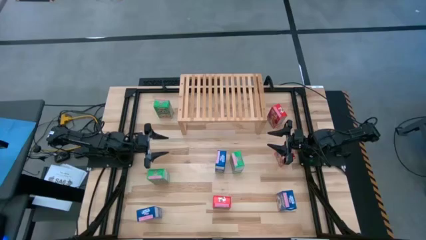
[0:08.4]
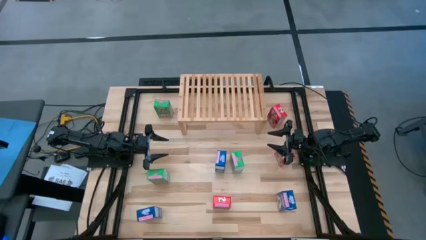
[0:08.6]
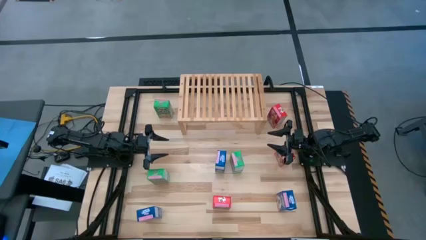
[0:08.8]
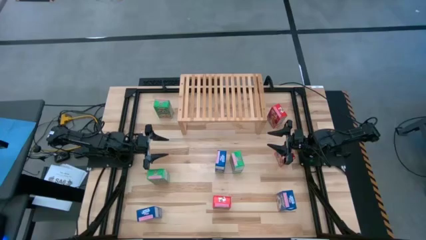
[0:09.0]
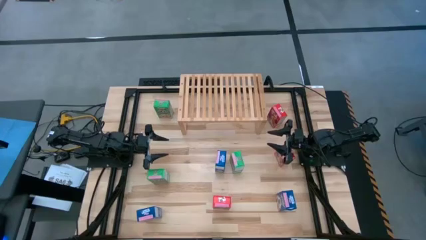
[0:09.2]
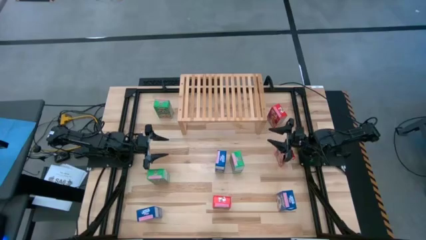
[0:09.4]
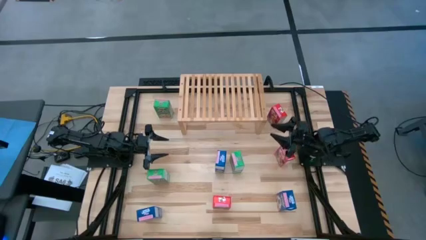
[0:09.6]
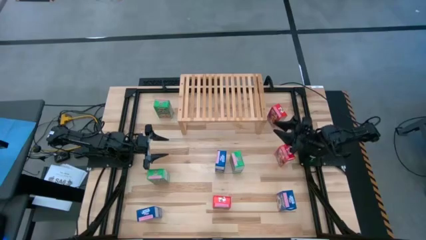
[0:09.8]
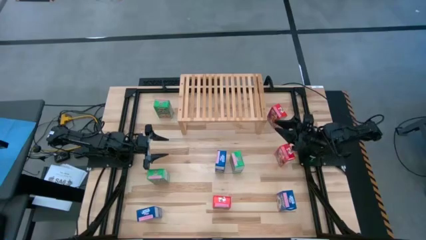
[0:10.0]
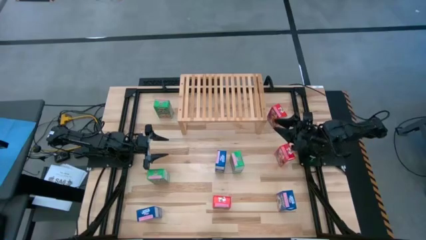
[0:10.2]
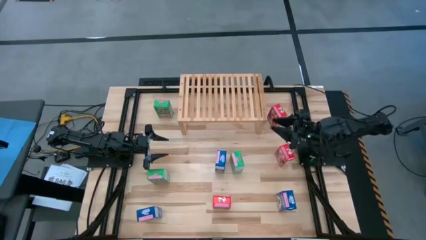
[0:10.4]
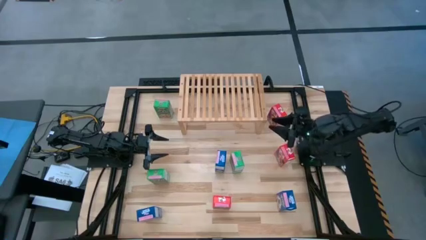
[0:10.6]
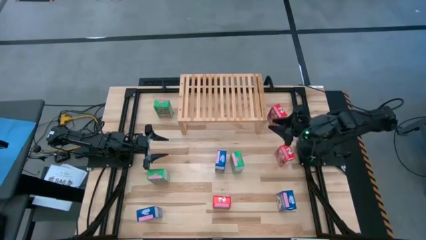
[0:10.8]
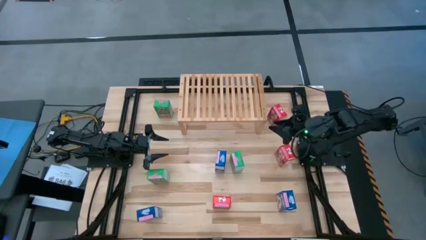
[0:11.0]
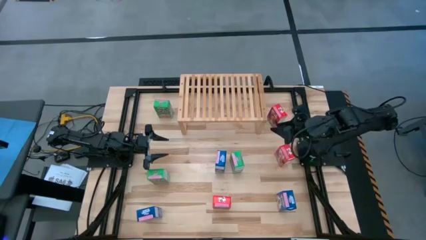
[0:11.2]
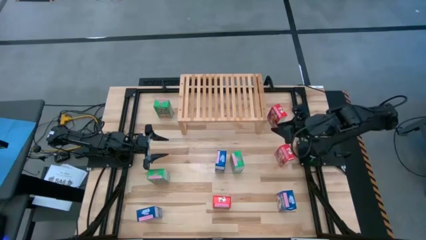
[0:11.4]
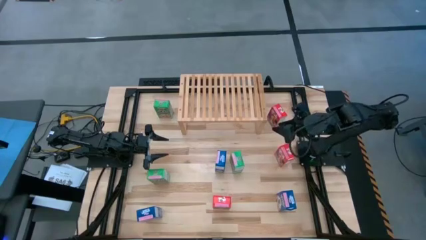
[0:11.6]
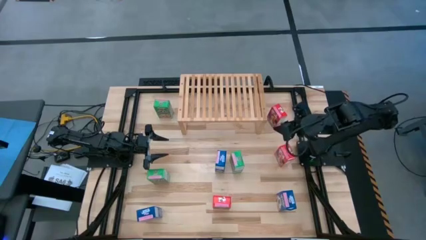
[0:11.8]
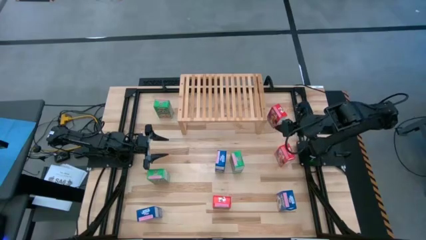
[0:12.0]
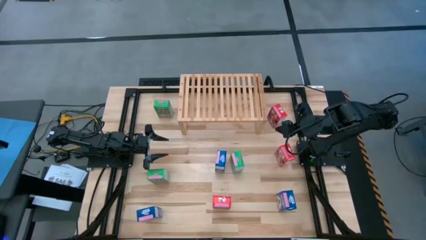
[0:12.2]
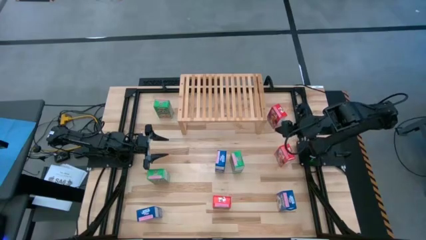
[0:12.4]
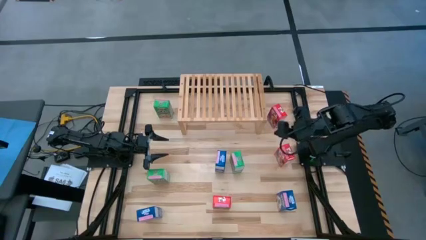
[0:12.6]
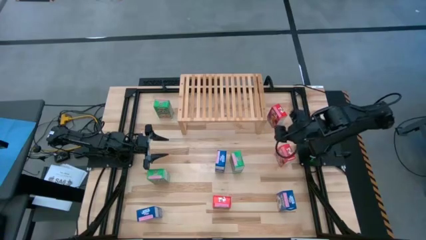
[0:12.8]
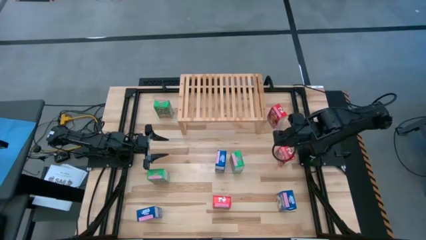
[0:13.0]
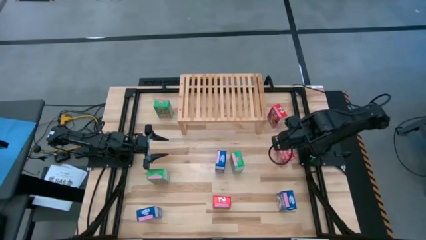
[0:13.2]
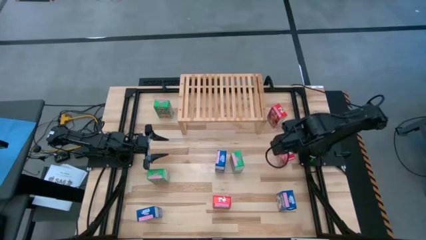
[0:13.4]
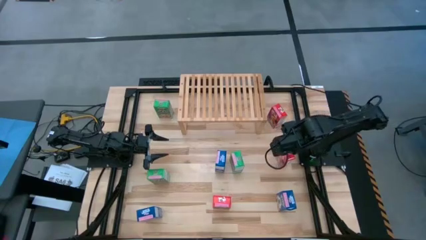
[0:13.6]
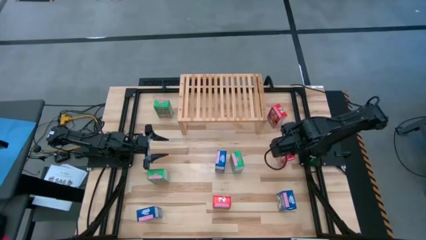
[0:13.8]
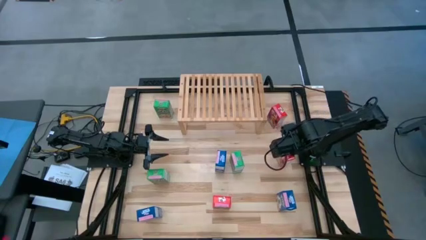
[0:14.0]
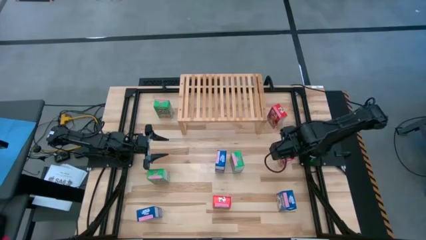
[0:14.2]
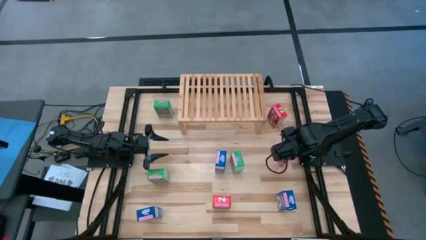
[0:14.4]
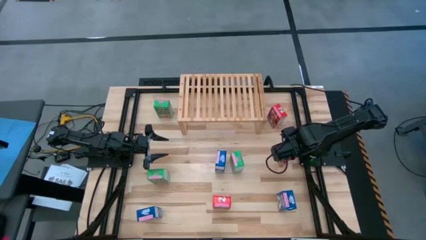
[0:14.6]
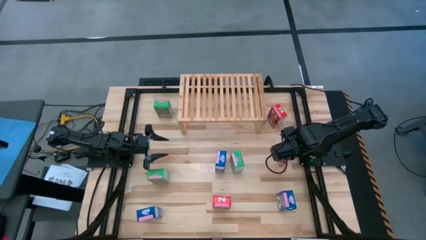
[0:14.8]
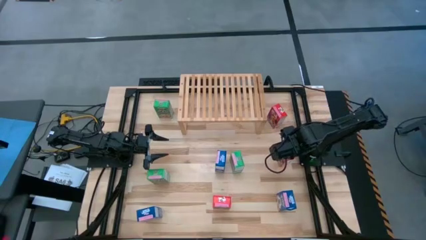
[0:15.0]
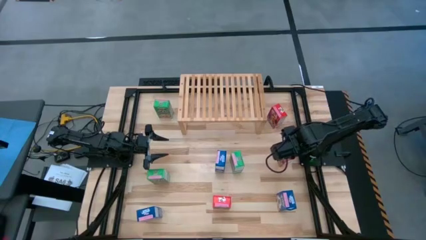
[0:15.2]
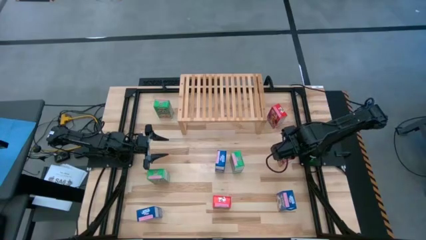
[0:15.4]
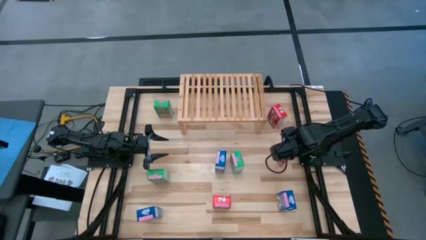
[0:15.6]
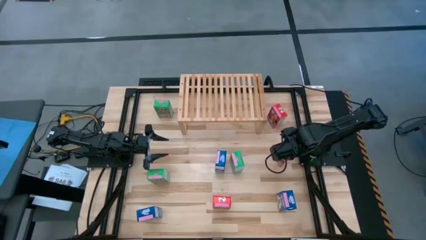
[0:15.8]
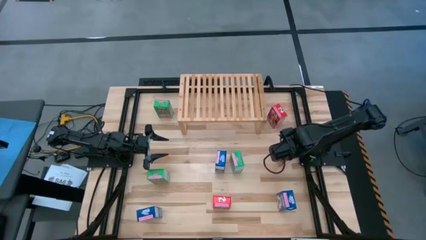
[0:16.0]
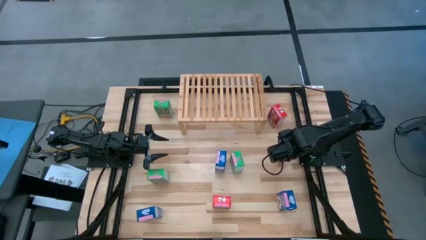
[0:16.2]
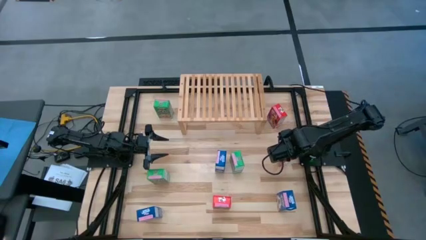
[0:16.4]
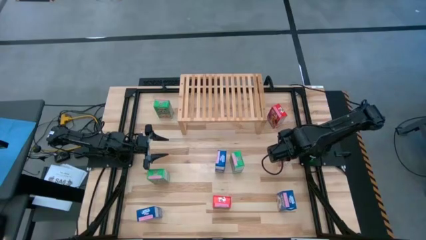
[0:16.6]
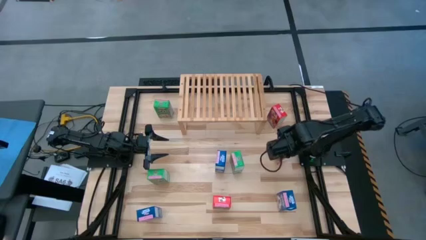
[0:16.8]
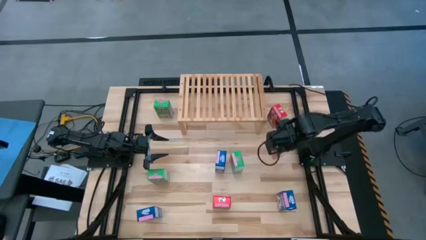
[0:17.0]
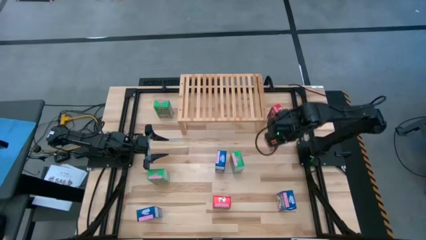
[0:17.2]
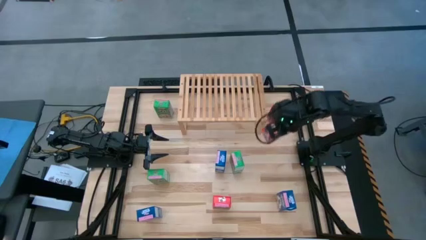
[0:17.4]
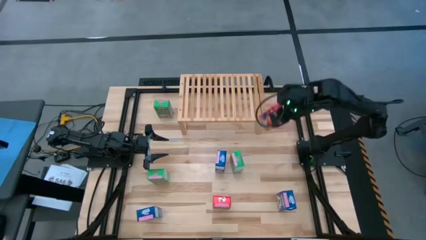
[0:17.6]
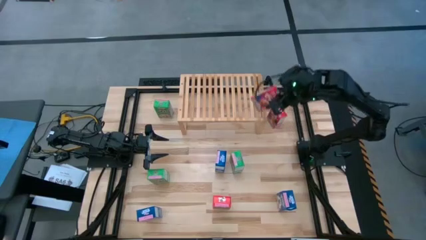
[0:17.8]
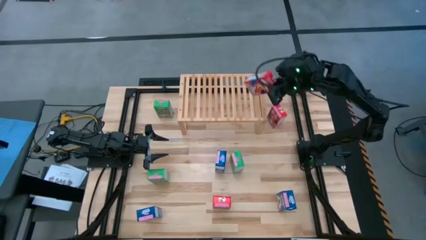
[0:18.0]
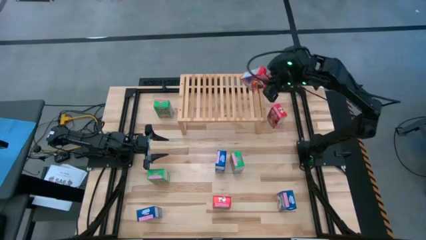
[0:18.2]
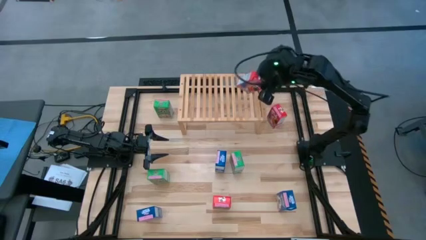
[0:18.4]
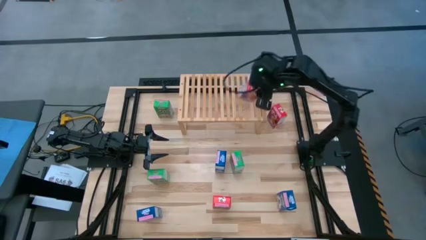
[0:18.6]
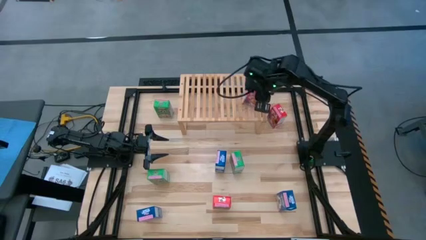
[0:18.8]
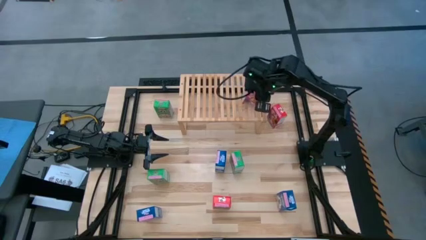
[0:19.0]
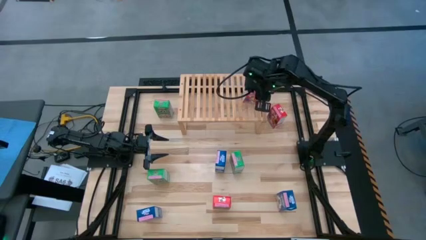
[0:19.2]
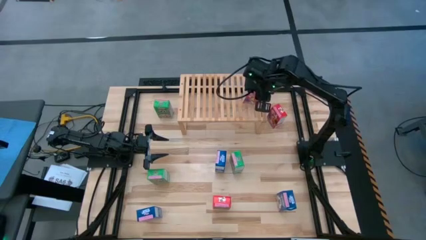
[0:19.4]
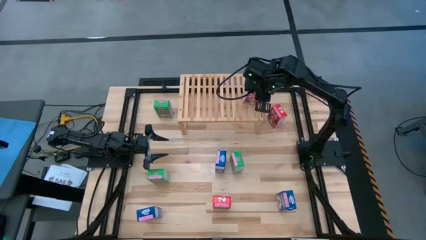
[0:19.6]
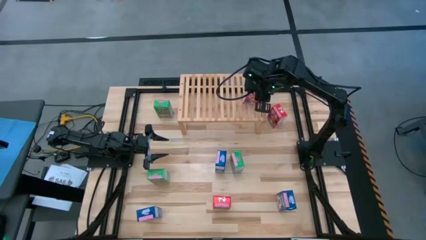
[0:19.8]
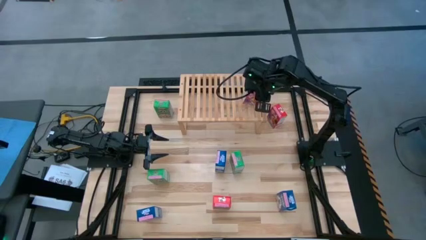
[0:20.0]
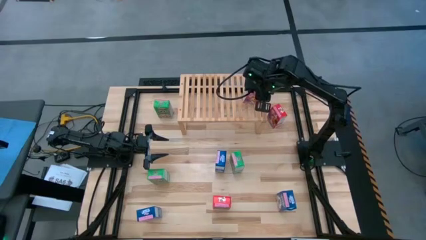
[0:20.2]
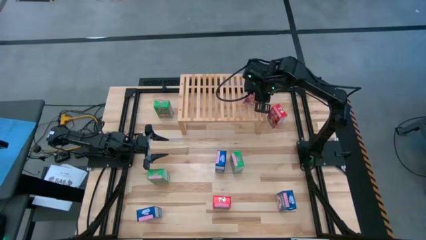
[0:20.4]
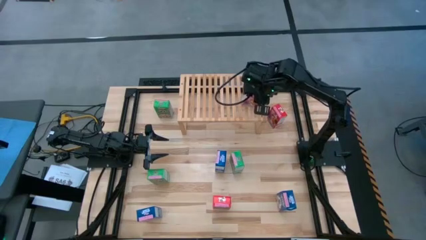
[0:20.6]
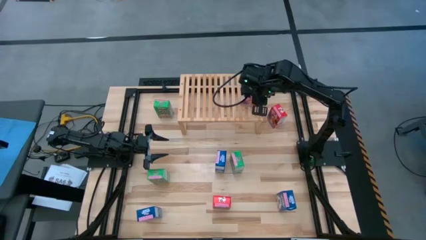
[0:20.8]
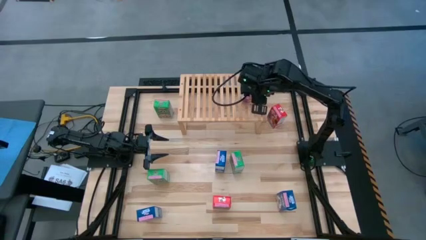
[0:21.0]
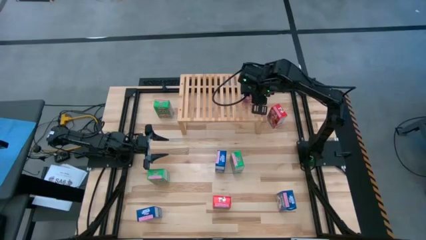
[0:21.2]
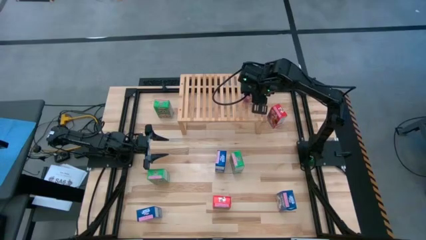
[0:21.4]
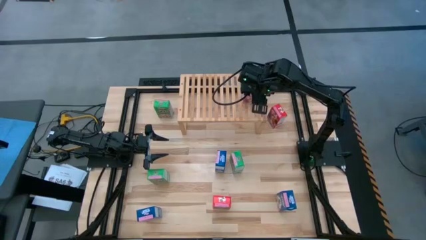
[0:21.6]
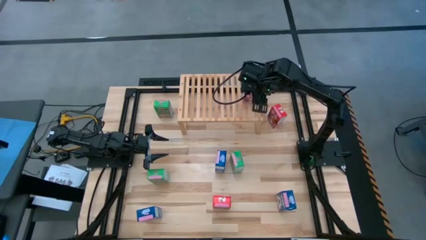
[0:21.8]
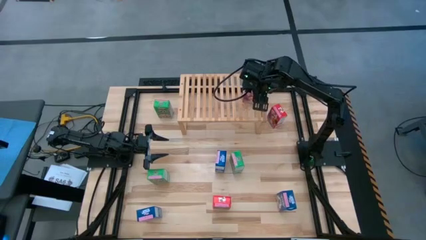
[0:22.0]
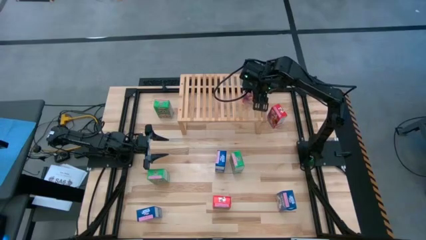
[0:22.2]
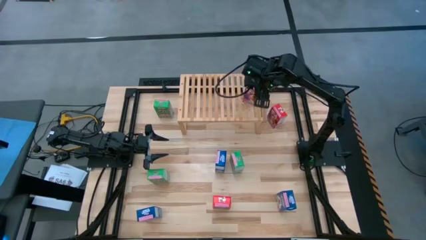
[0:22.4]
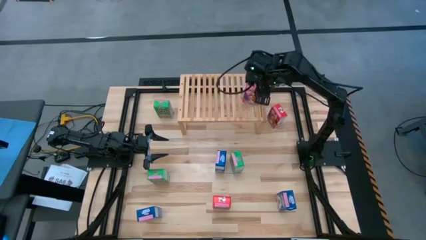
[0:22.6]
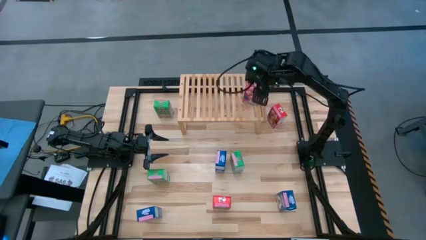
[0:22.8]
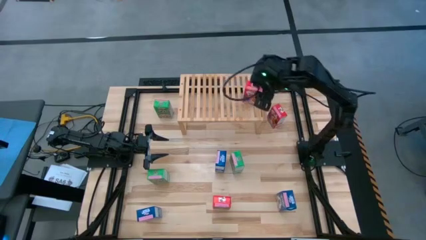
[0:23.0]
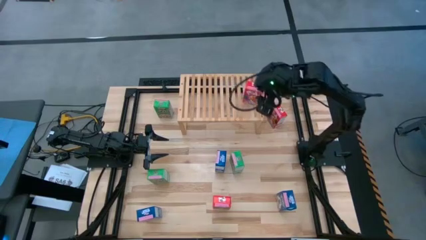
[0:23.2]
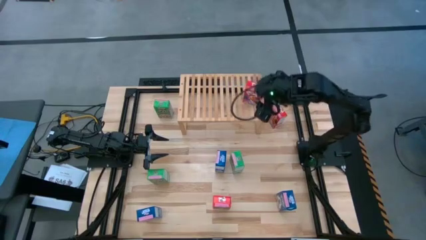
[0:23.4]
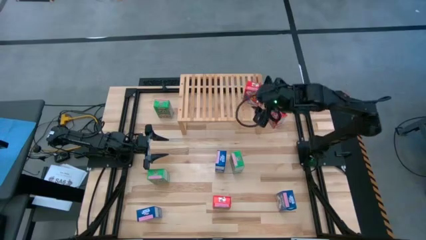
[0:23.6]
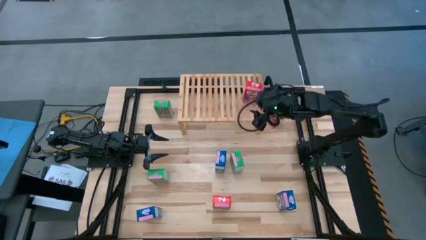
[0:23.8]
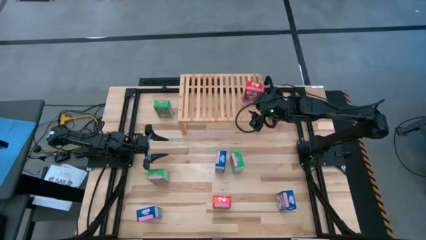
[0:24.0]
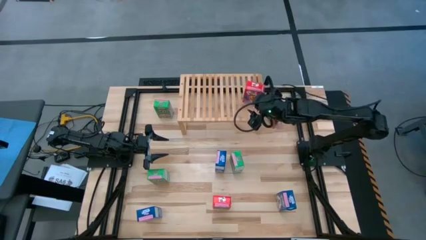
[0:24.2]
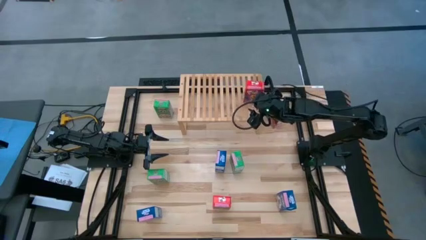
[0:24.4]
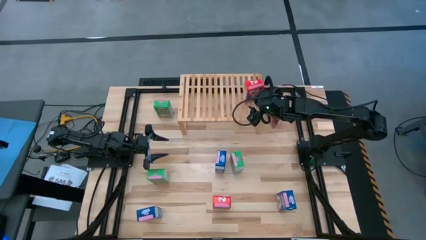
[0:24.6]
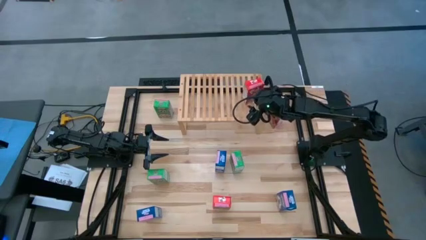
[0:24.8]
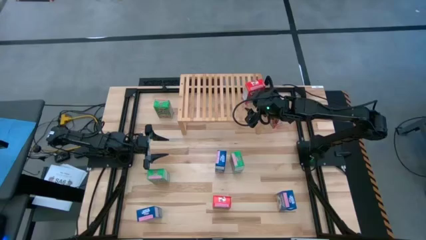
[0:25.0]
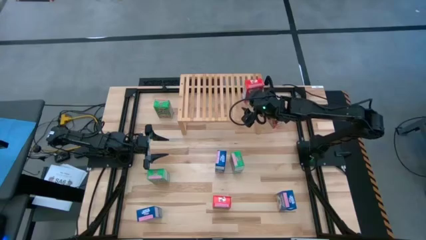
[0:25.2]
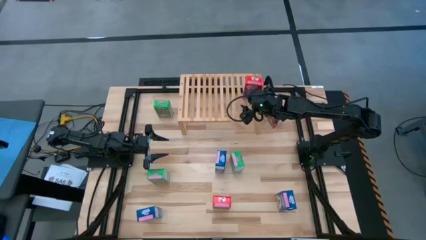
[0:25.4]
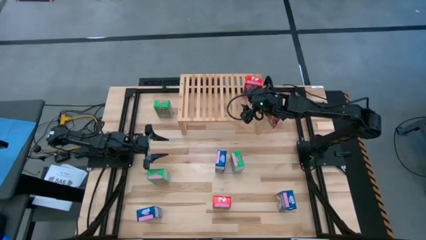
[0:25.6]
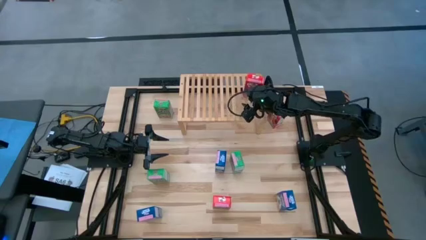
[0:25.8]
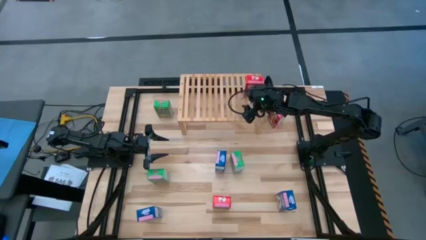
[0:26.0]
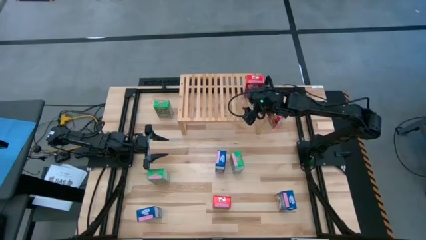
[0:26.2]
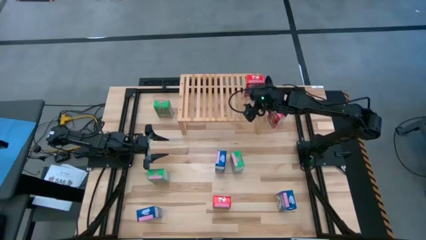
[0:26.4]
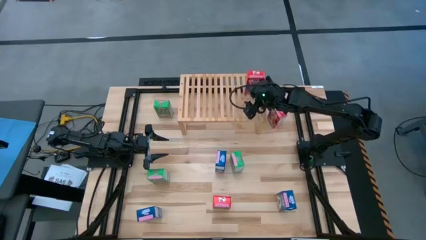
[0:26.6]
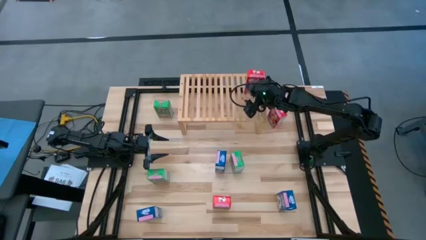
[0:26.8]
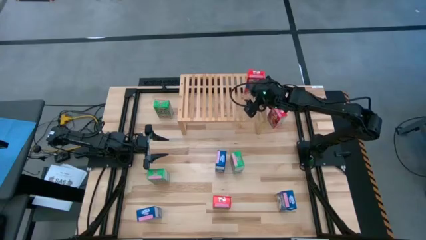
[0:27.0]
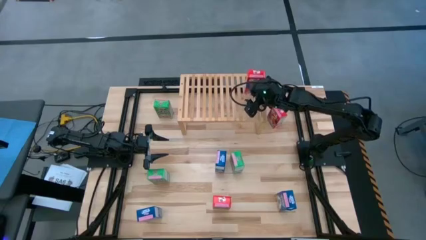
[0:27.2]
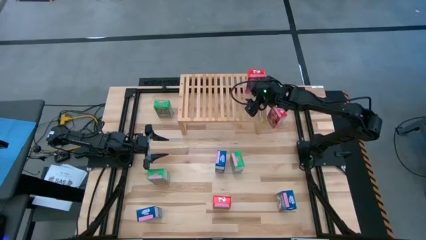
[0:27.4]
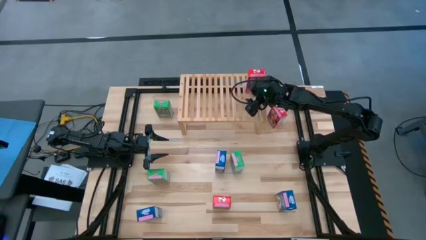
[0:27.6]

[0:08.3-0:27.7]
Task: Stack cereal on shelf
Put the middle red cereal box on the shelf
